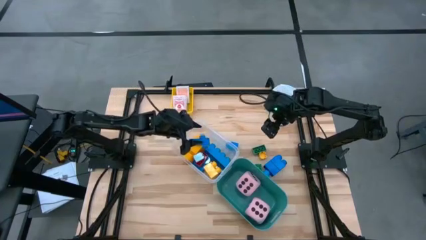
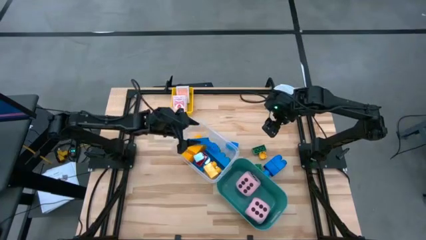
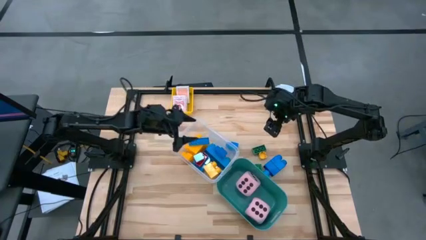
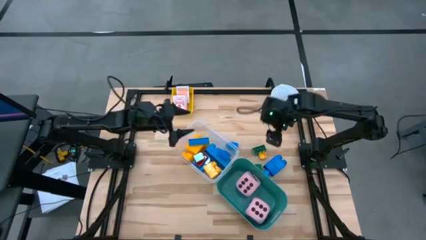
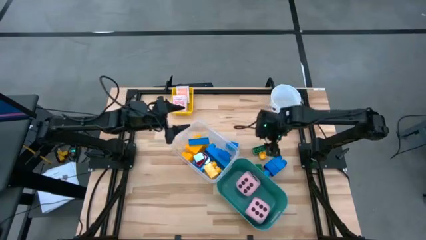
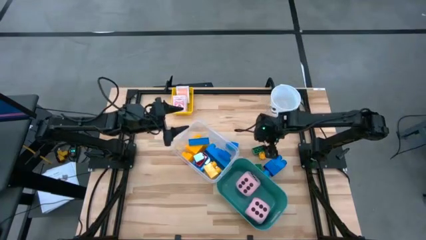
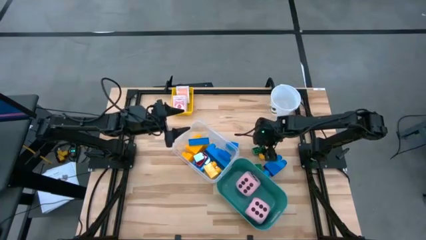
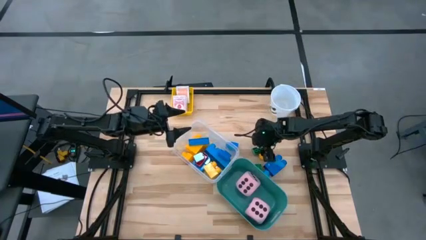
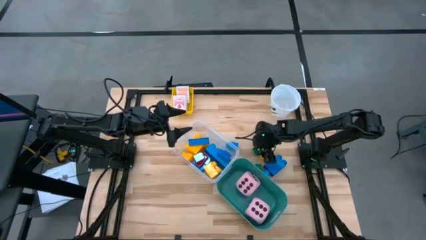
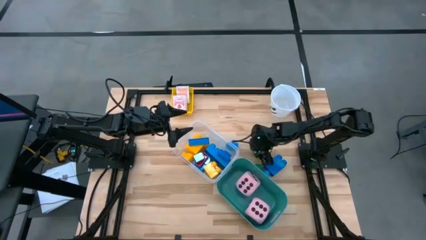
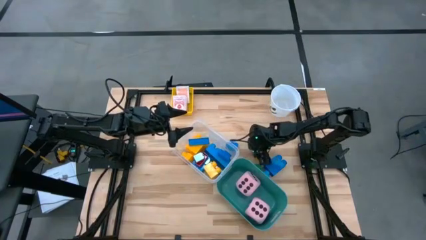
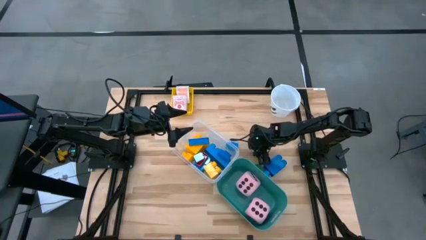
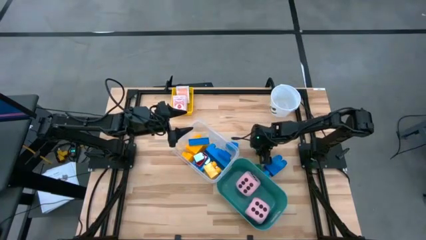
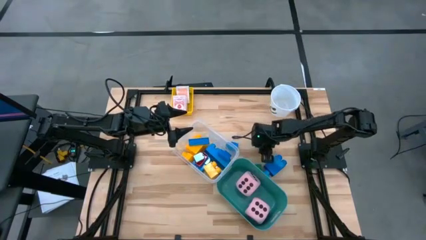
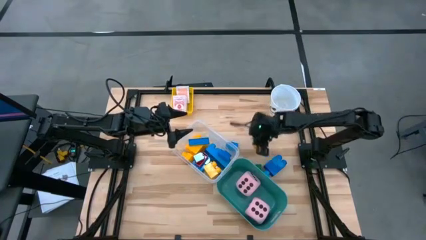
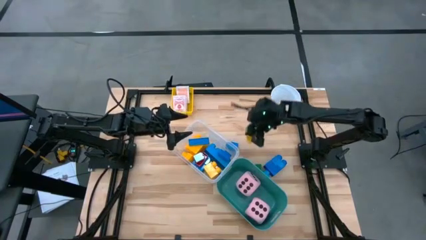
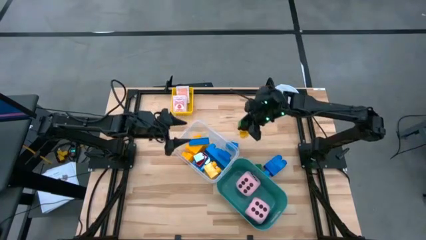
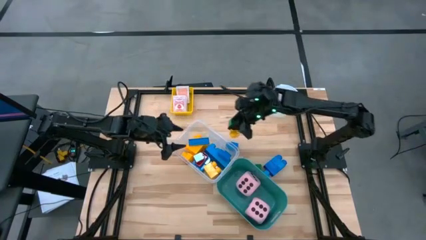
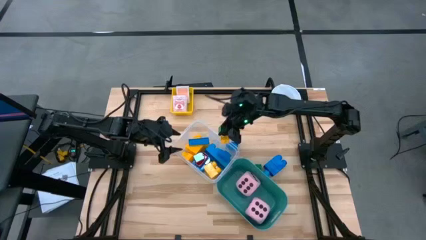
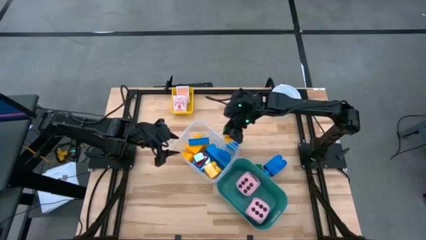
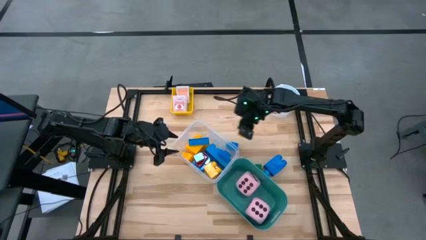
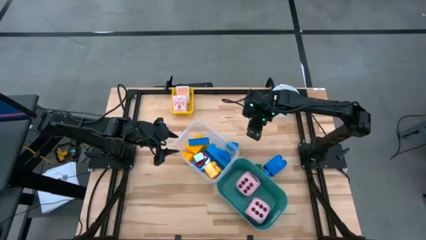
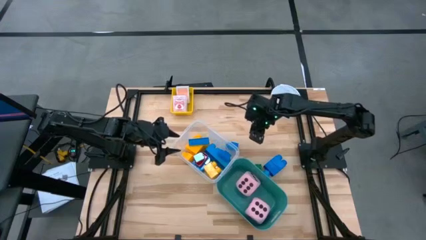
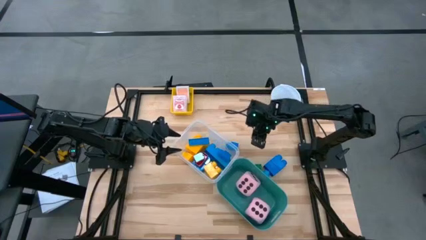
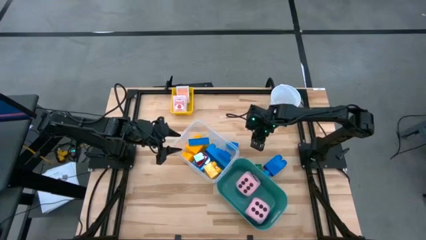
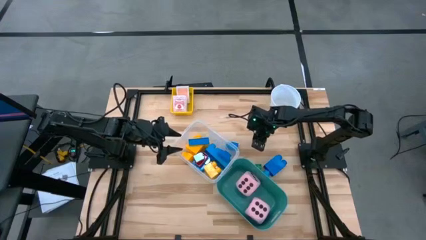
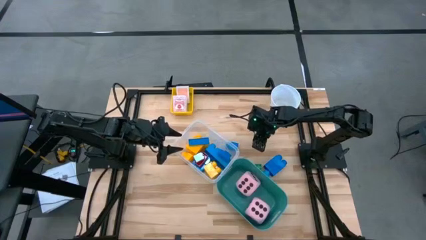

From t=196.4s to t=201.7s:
Task: Pick & Place Toys
Put the green game piece into the transparent bin

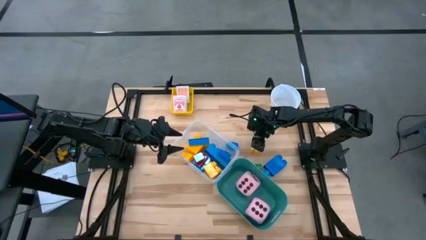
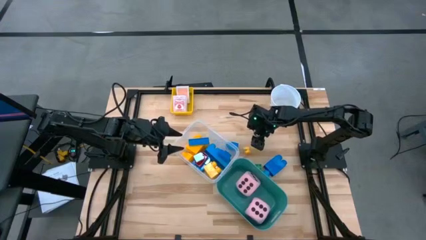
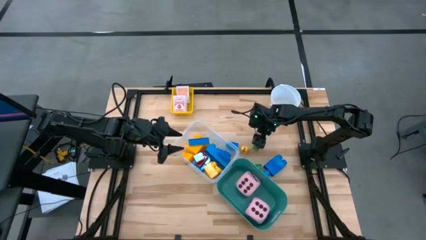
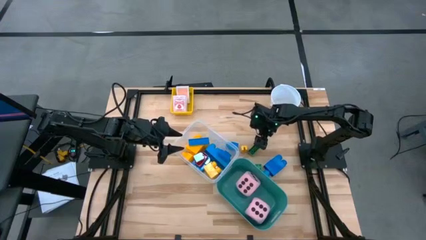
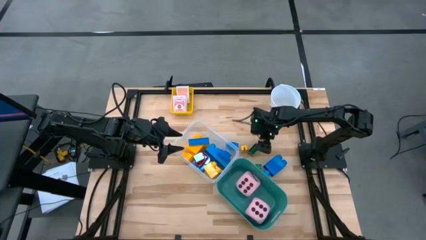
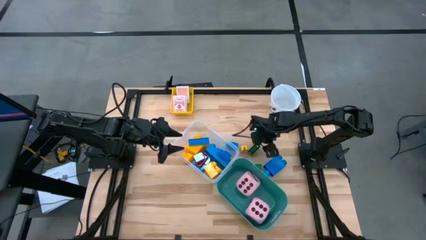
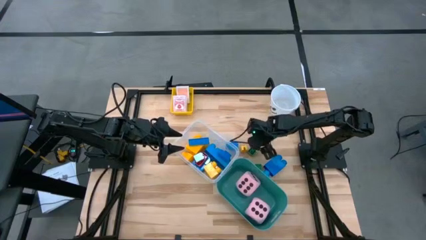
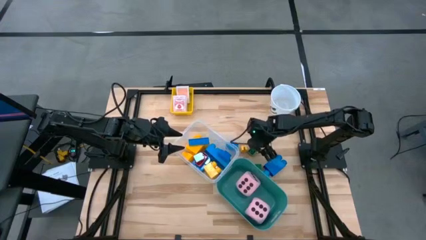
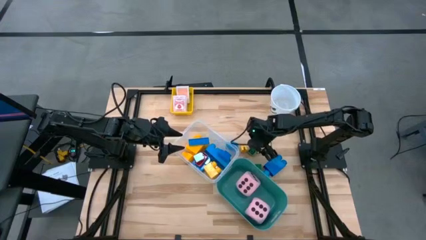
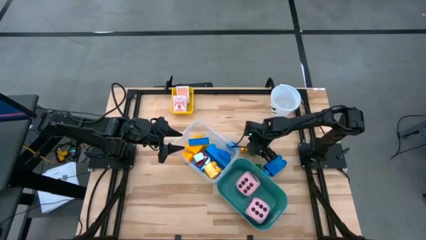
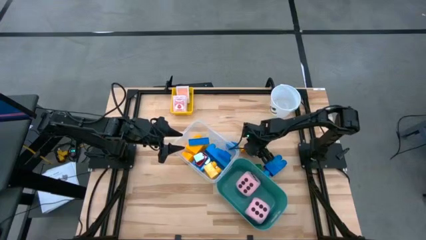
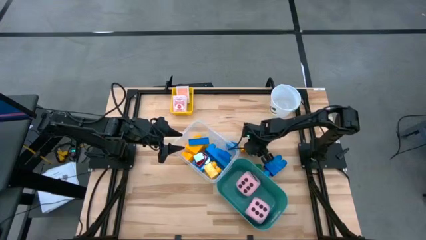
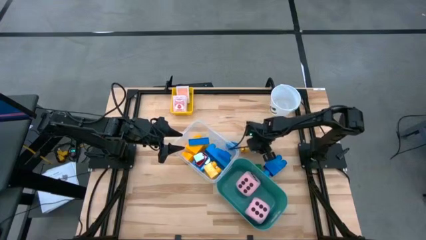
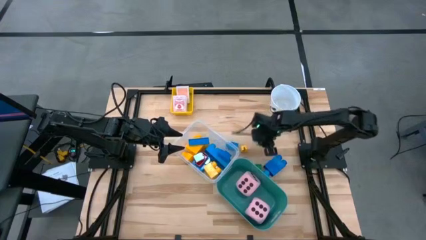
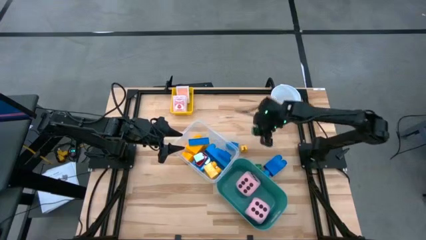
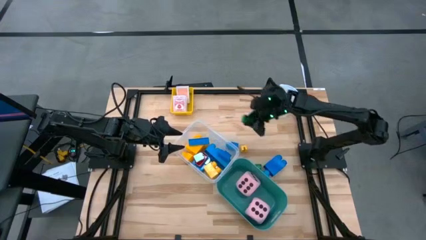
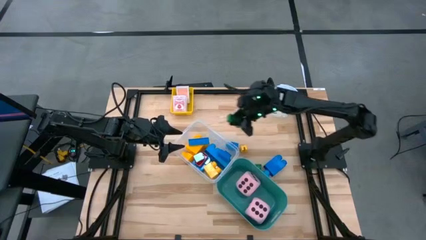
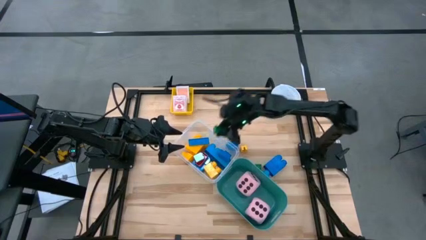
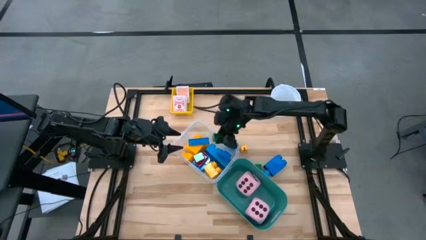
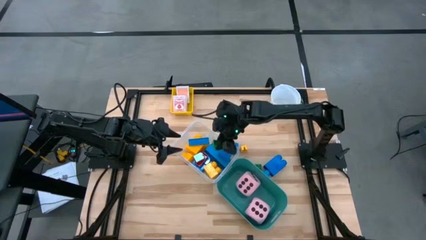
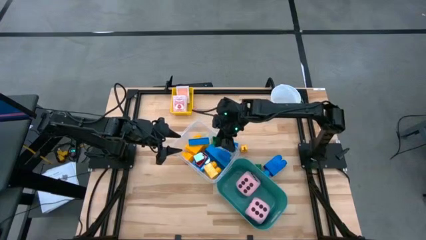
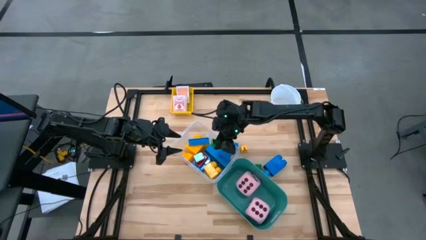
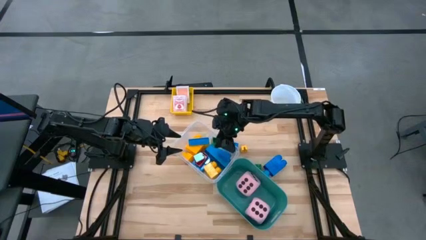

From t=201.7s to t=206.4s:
Put the green game piece into the transparent bin

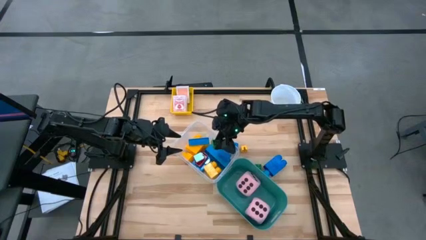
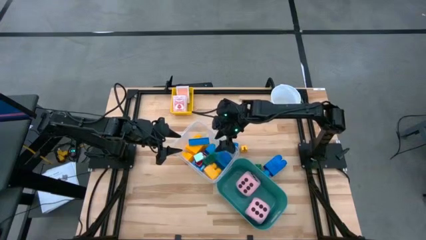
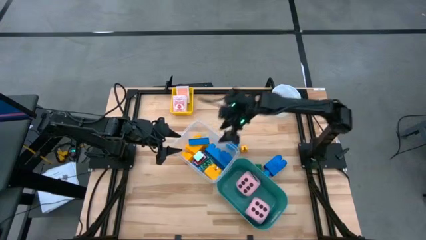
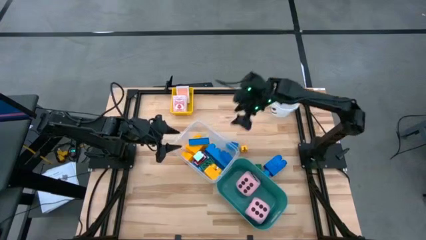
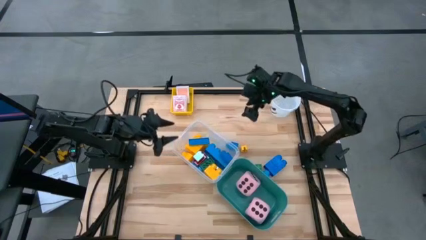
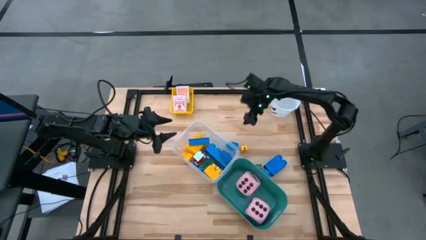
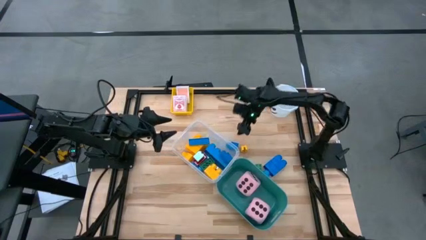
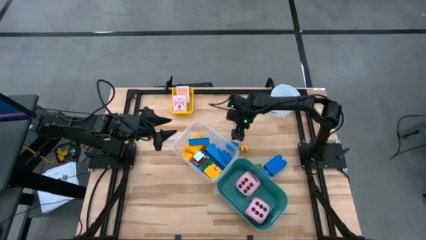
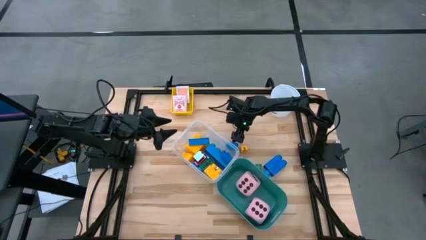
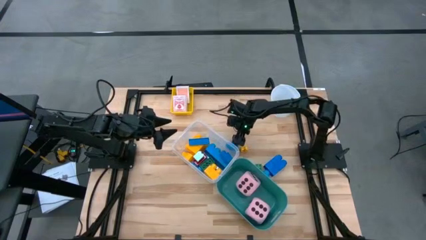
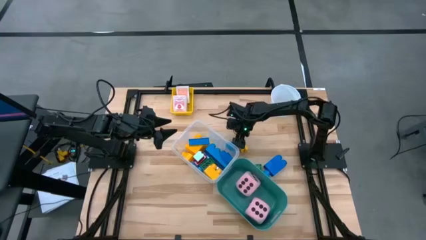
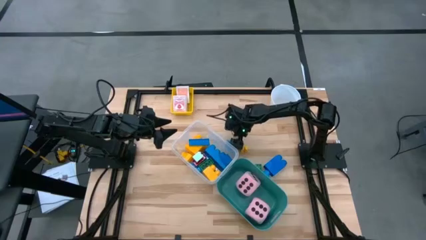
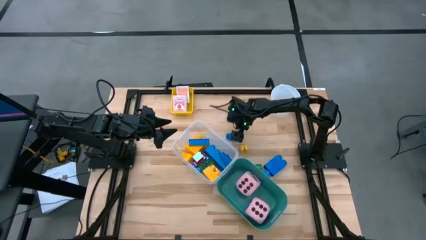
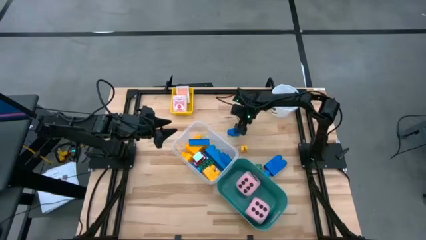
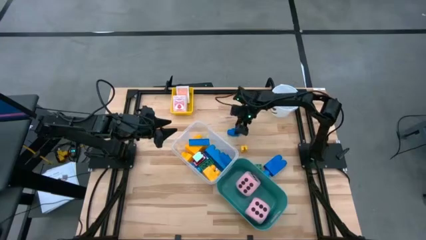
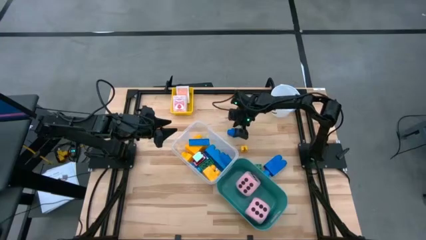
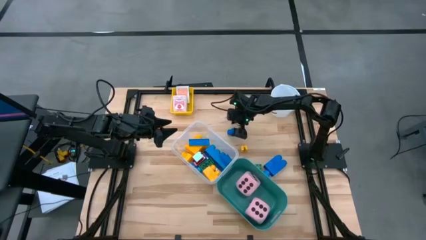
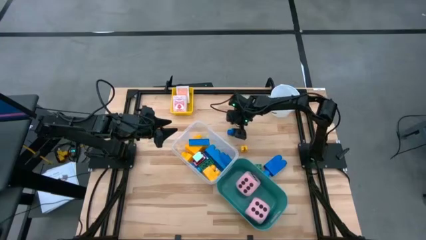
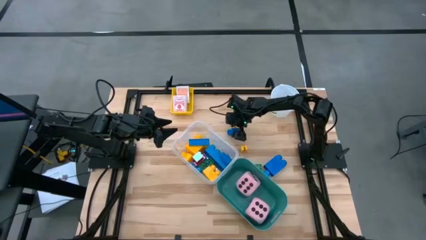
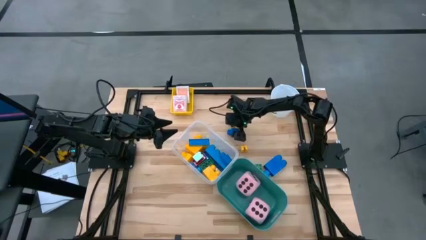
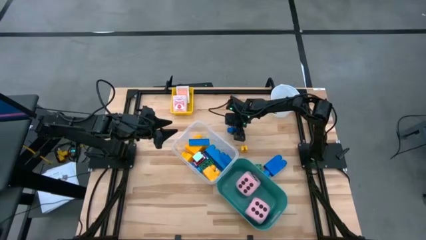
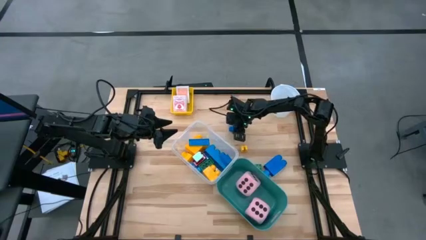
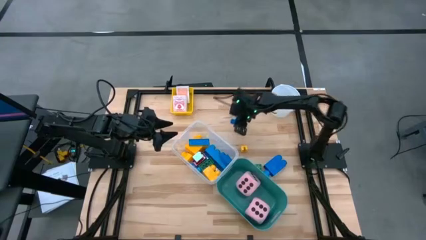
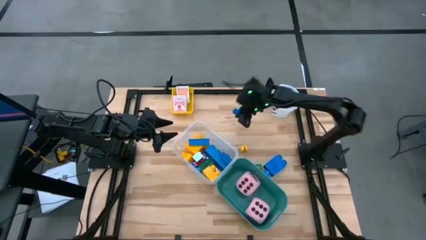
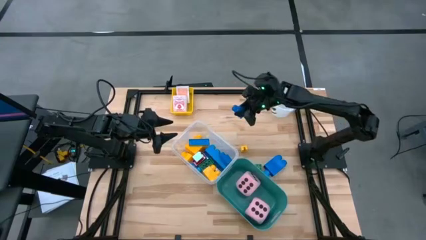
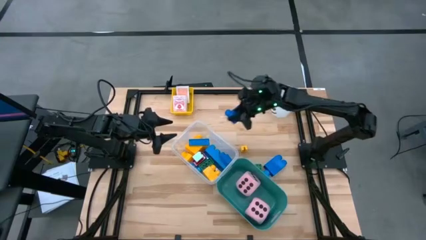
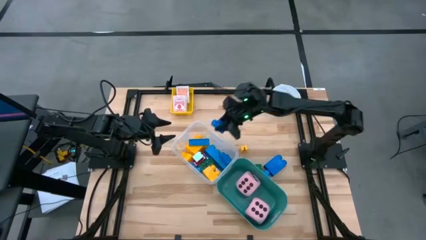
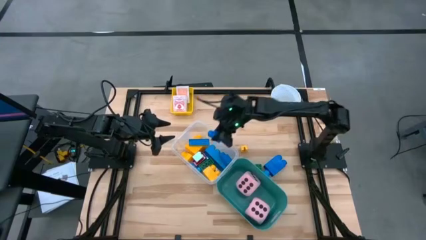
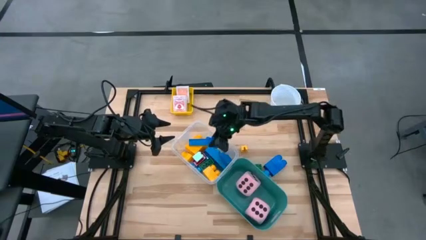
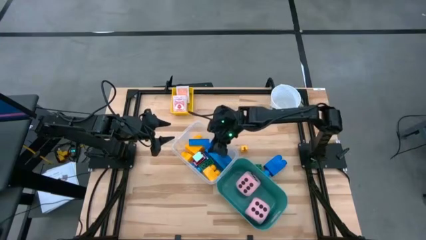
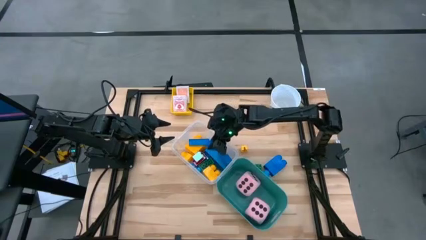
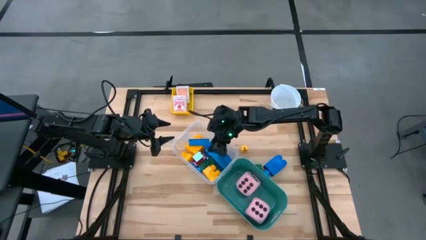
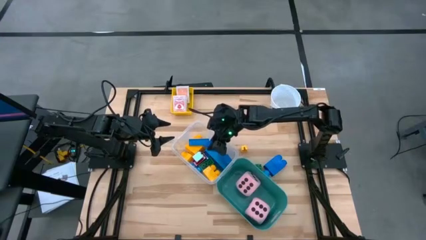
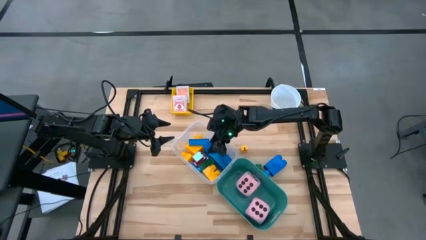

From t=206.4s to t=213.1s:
Put the blue game piece into the transparent bin
